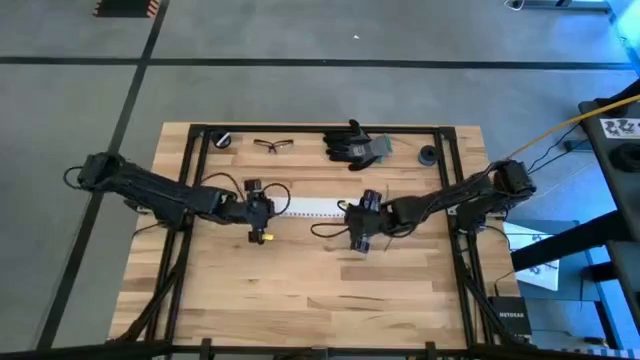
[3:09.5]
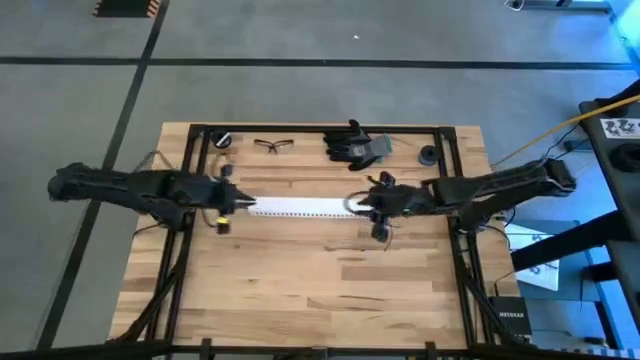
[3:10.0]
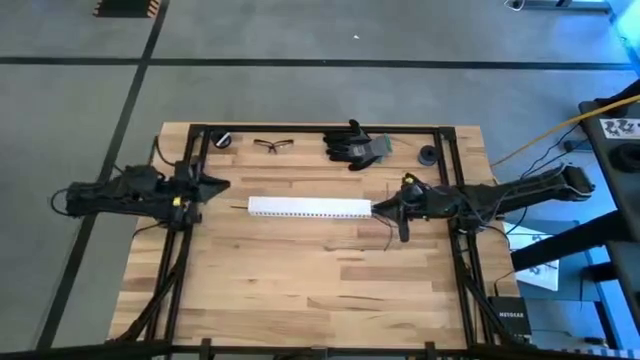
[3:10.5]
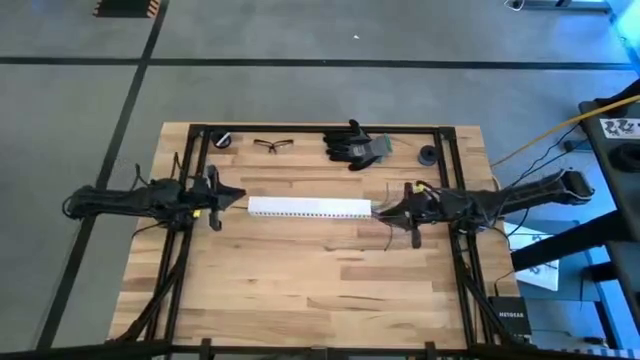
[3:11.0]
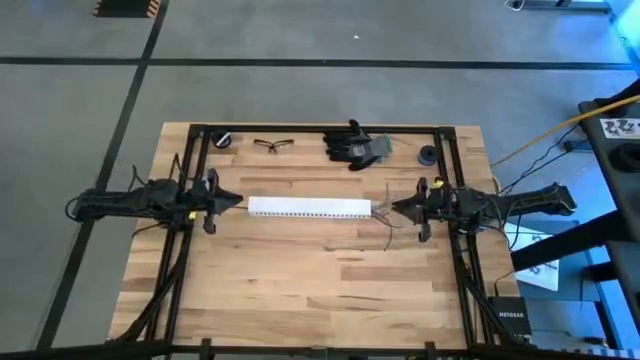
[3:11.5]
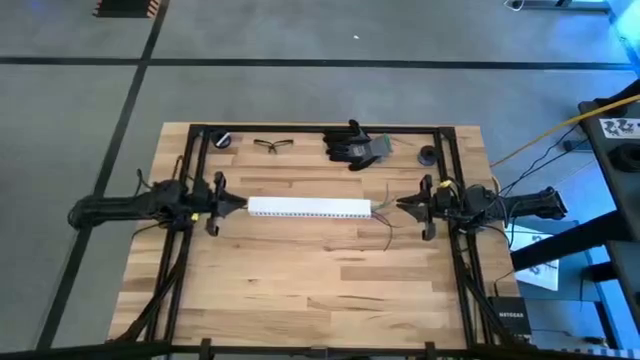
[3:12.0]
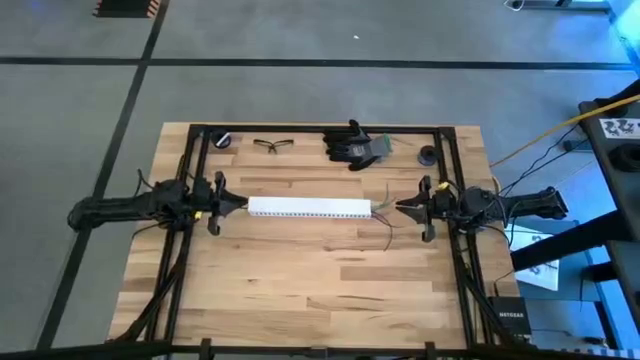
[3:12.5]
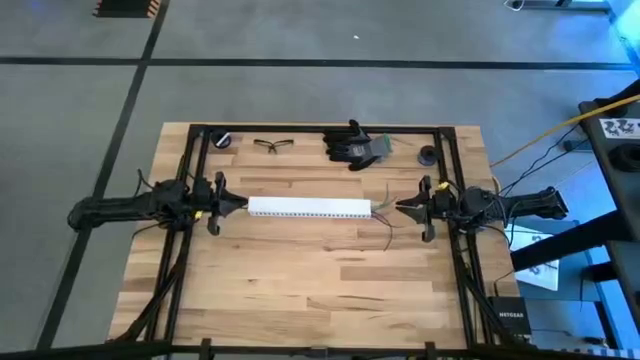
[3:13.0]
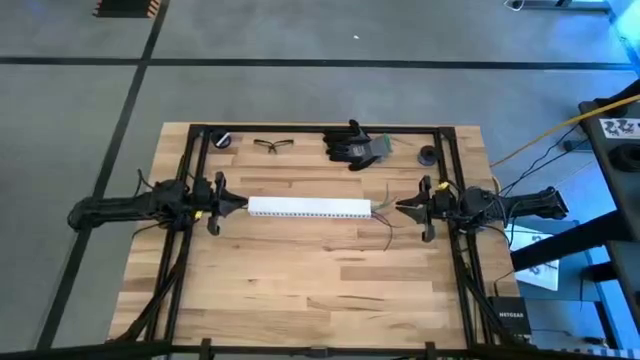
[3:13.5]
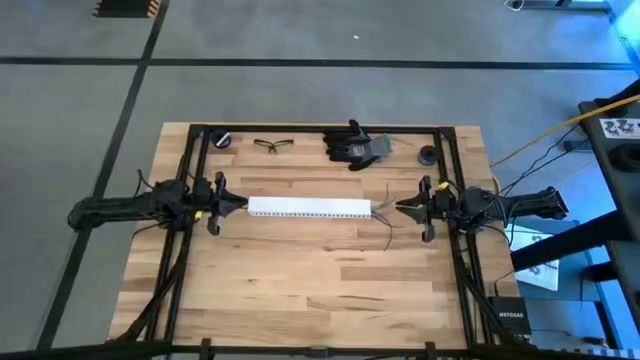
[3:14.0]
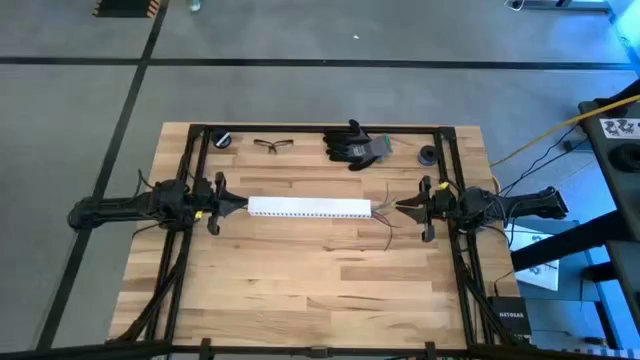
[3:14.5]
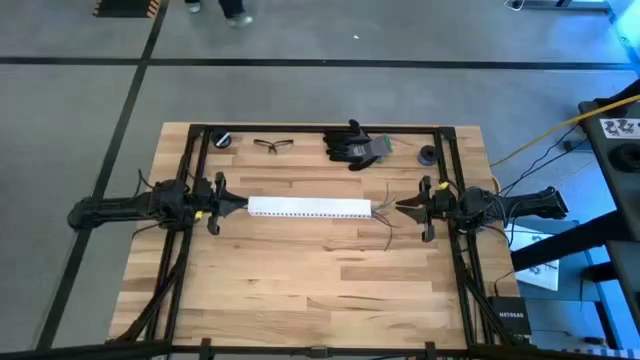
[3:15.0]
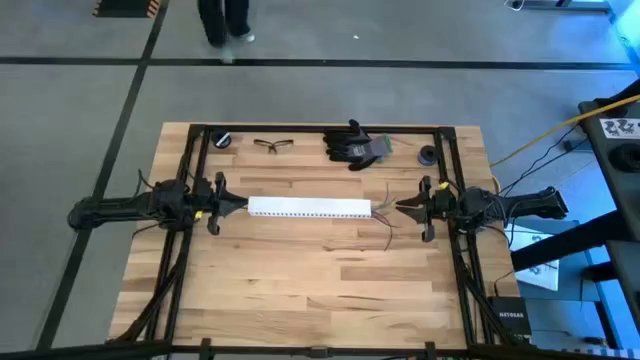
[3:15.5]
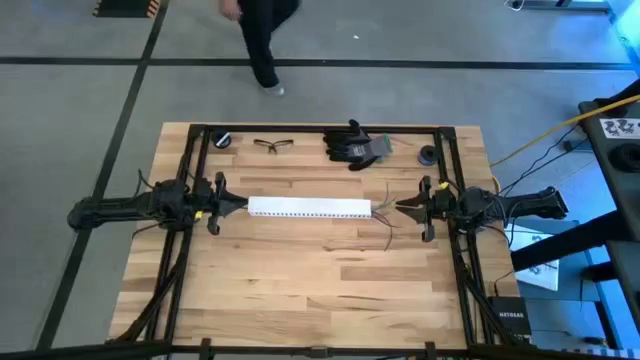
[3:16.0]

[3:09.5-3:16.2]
Task: Ziptie cables
Return to Home Position

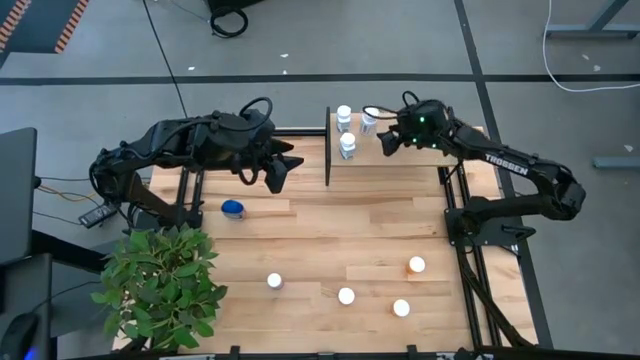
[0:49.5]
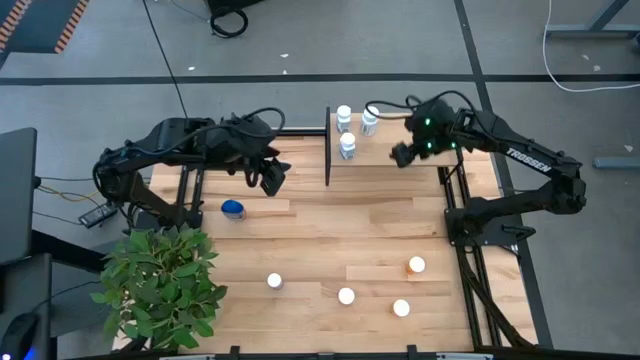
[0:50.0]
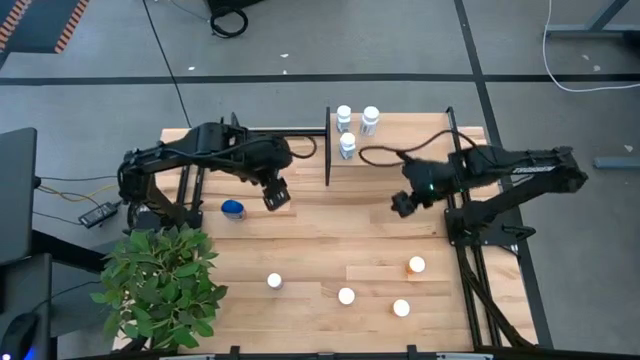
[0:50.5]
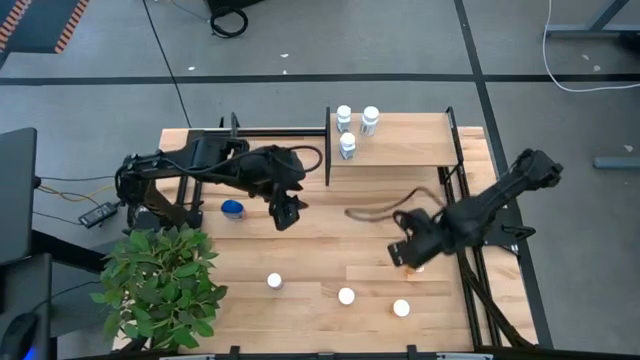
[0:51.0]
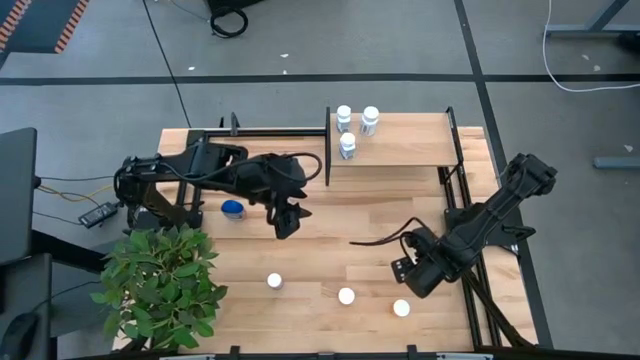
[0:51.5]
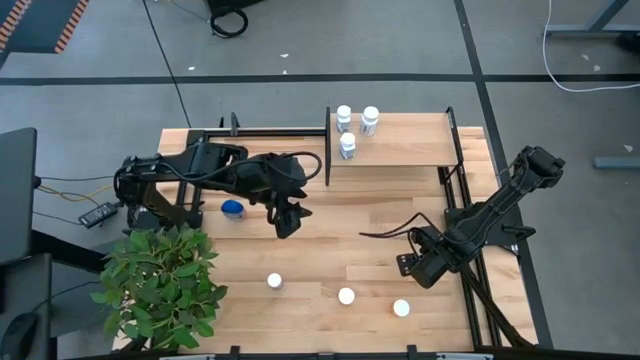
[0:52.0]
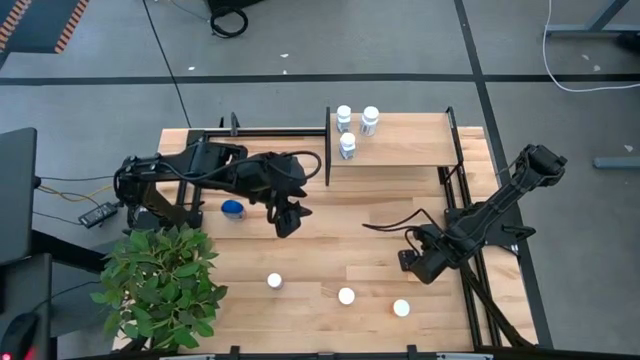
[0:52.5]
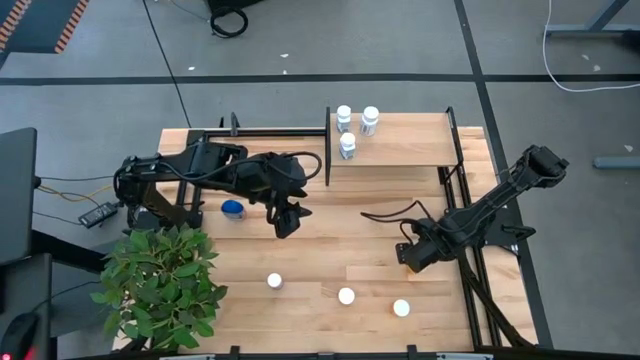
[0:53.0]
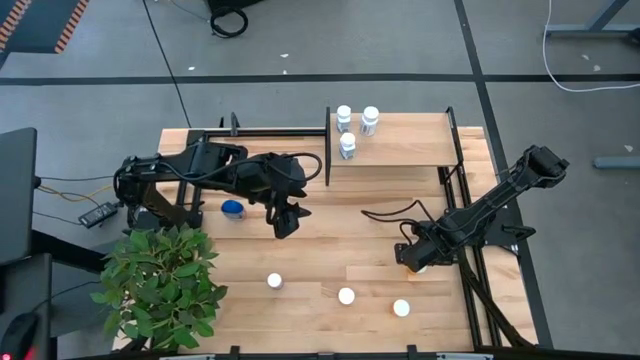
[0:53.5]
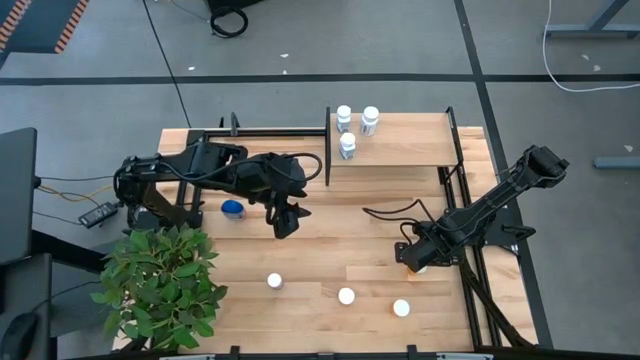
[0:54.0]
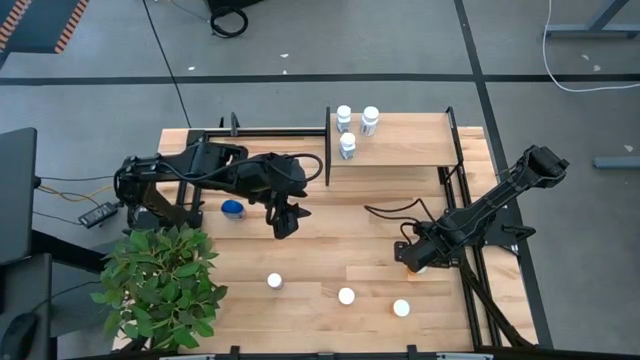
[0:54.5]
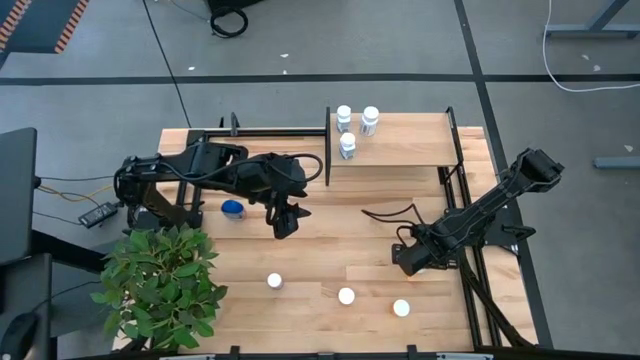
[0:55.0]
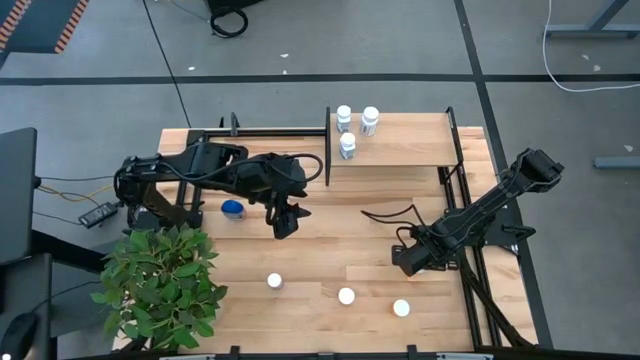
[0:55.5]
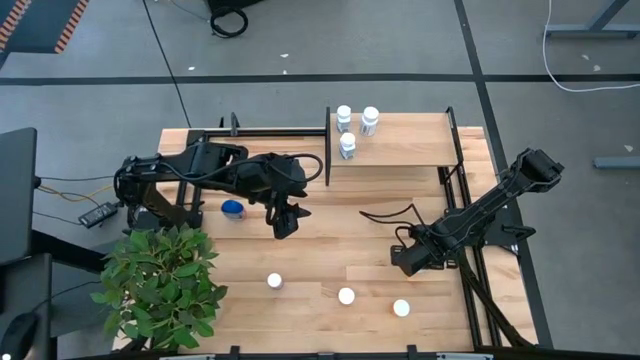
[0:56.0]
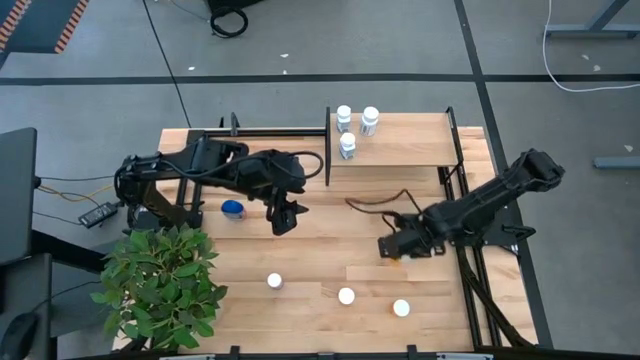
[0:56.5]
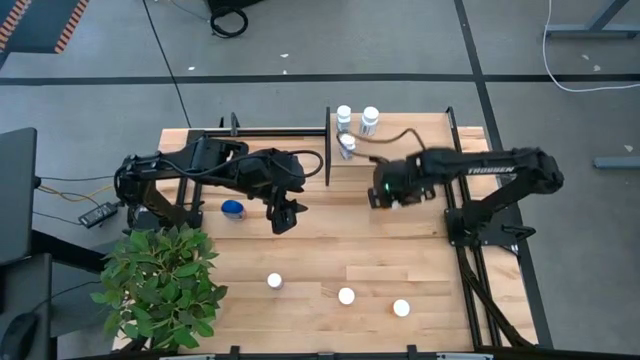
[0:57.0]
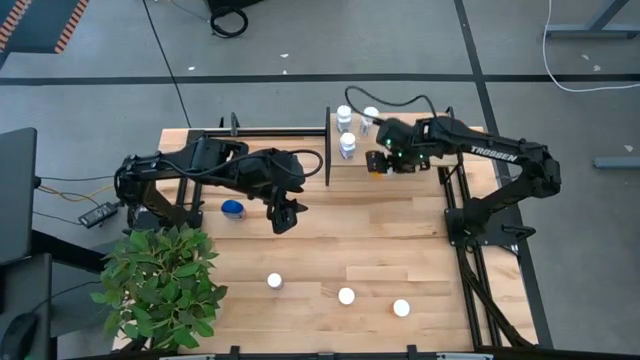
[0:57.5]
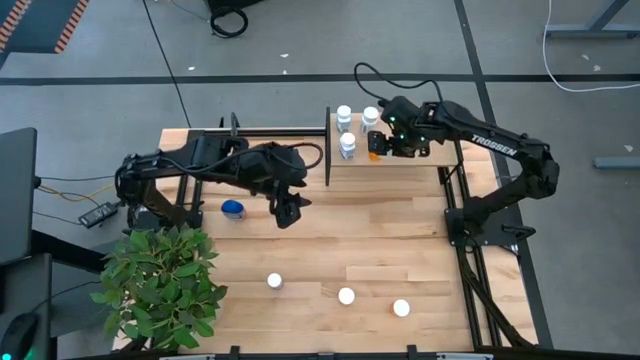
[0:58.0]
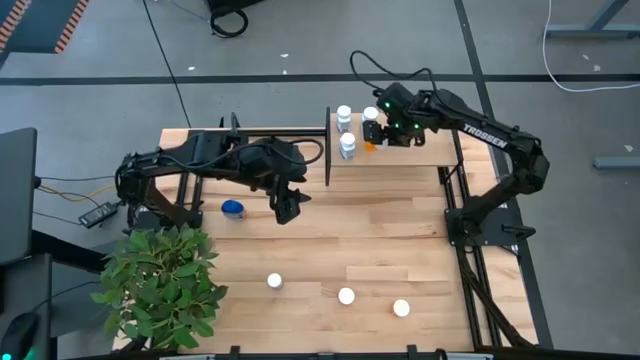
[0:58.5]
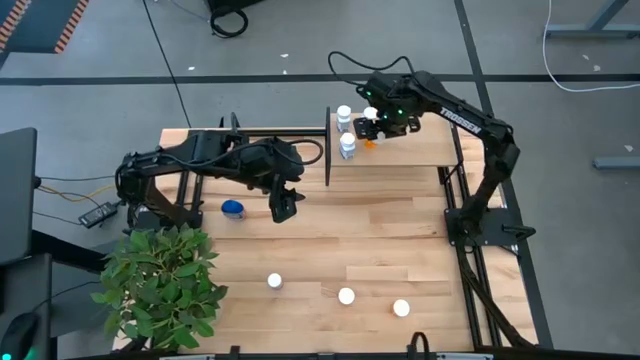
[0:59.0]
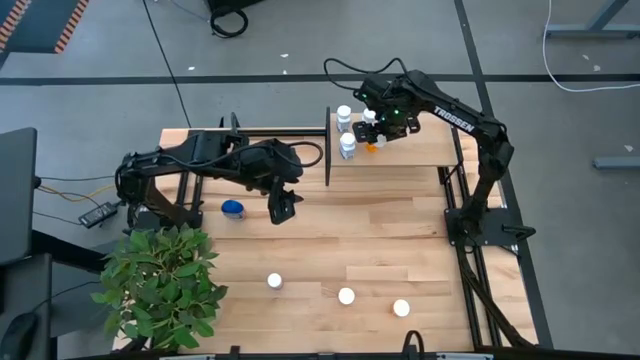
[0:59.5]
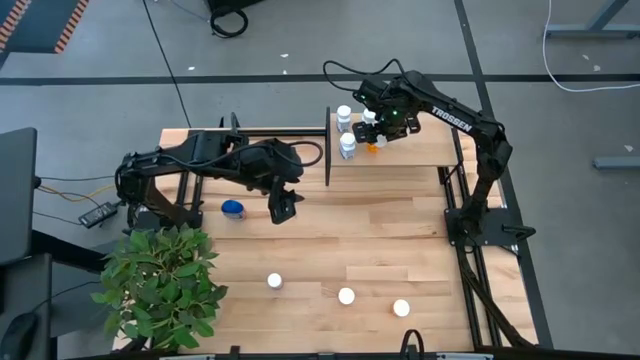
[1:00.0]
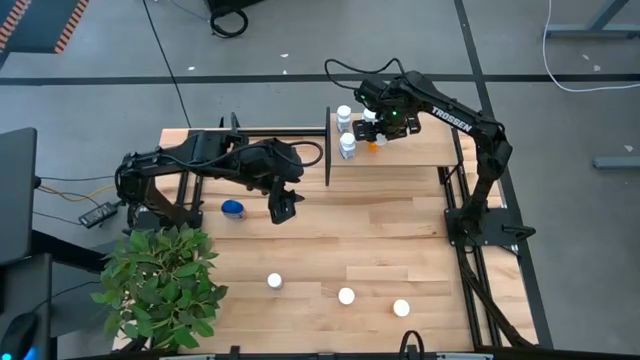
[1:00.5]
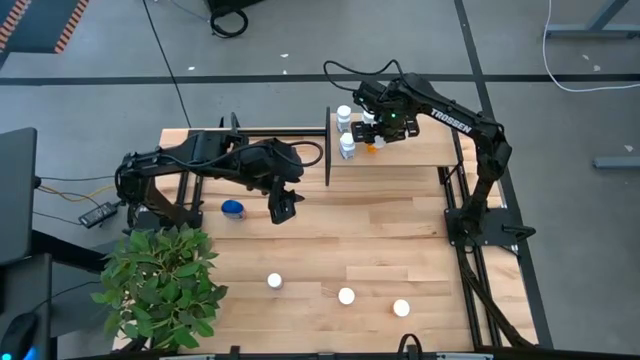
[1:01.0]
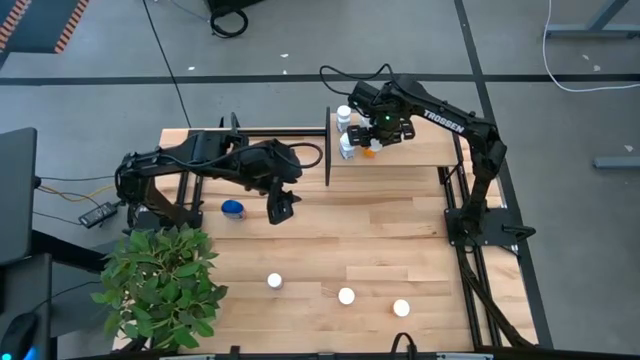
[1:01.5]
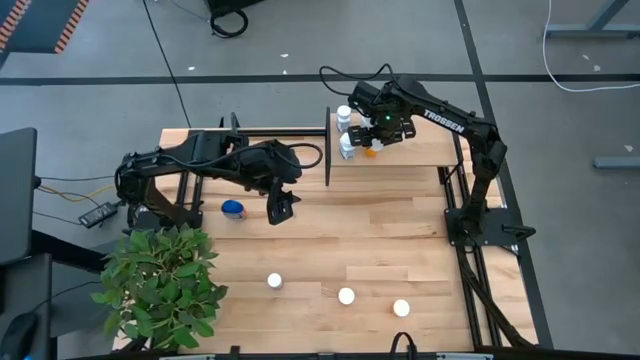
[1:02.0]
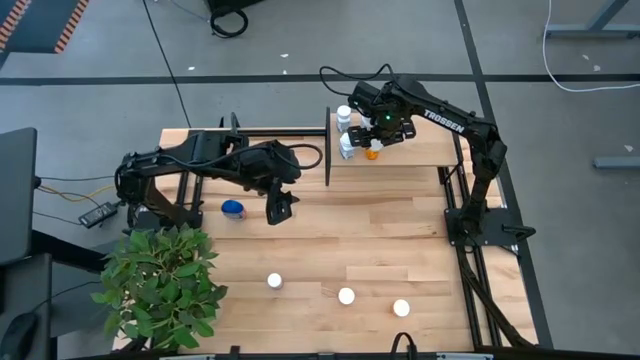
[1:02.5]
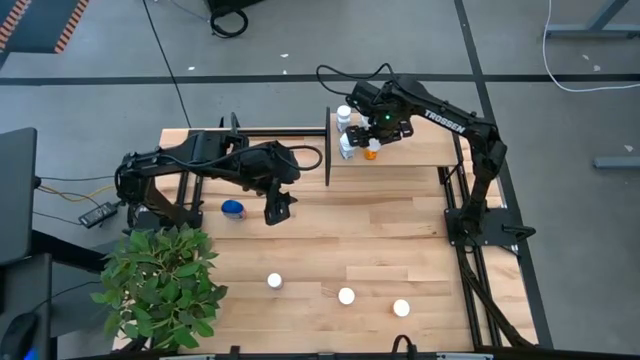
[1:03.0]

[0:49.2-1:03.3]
Task: Pick and place medicine bottles onto shelf by color
Put the top orange medicine bottle on the shelf
